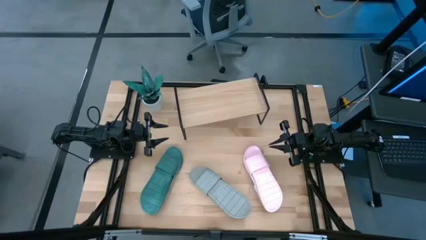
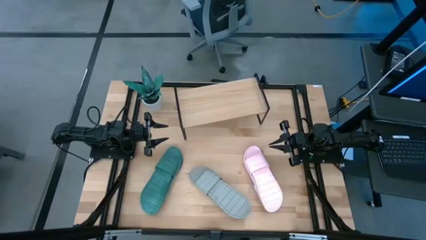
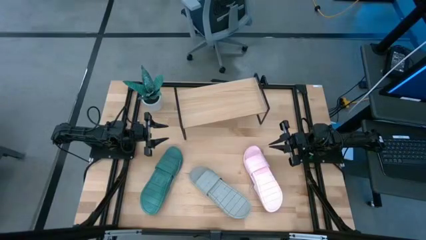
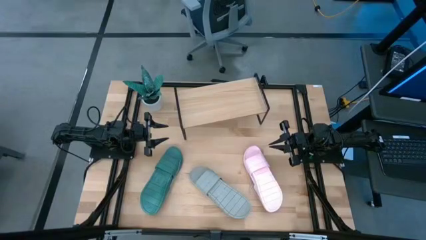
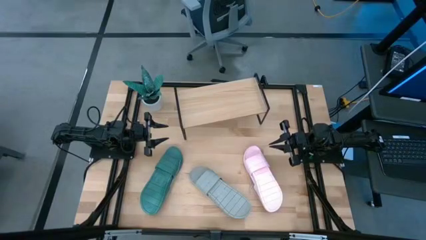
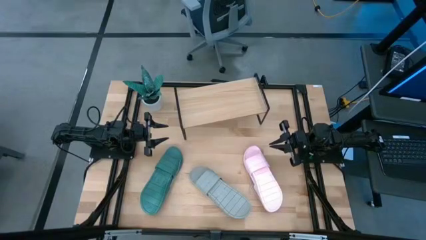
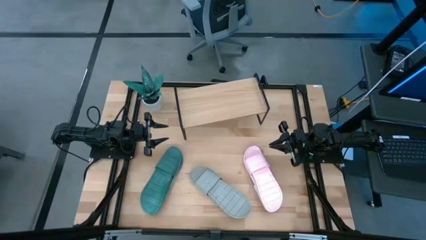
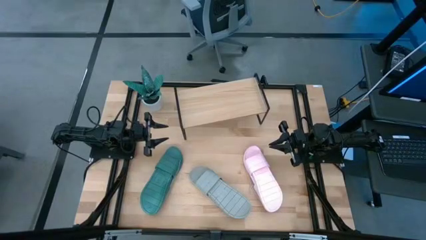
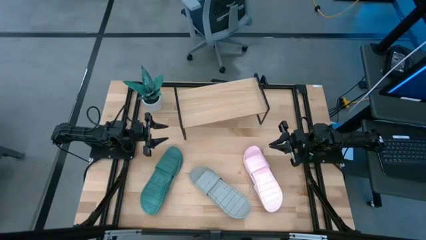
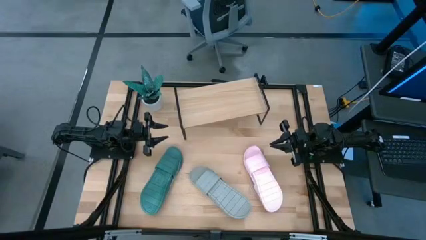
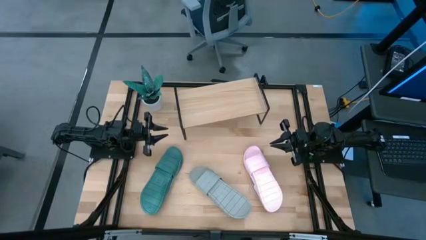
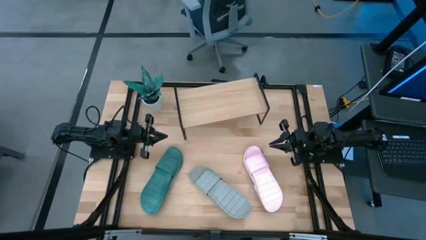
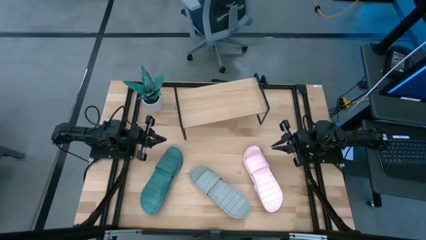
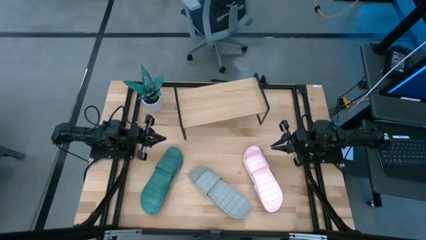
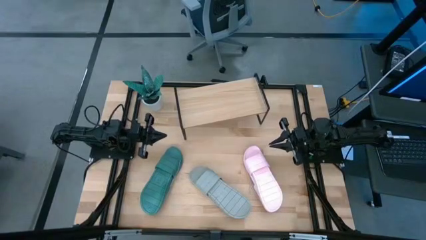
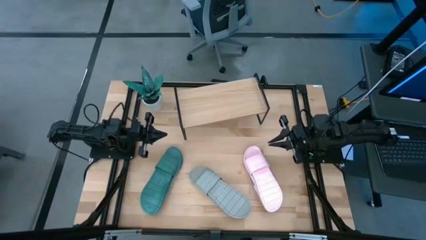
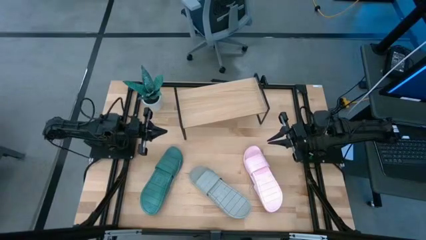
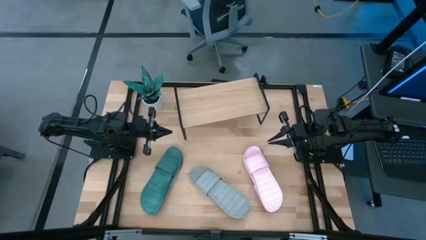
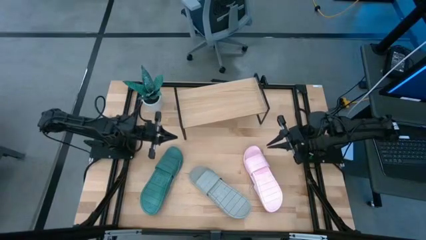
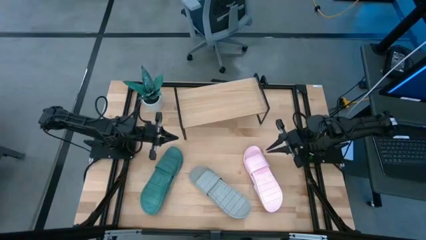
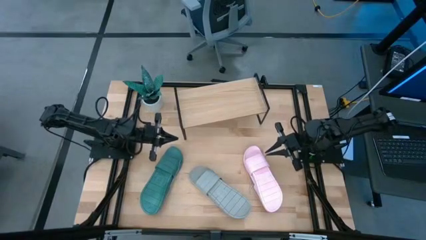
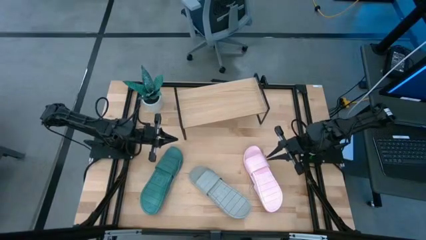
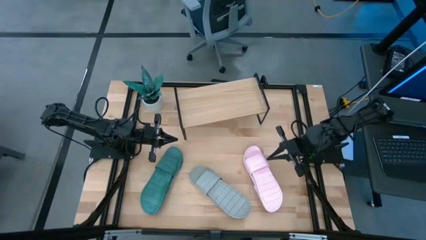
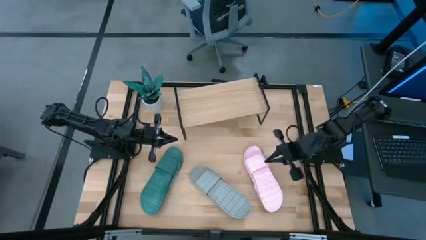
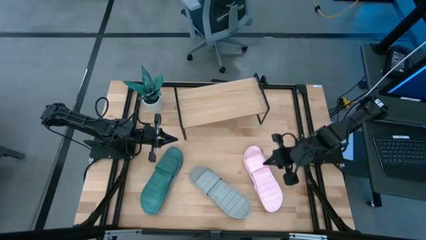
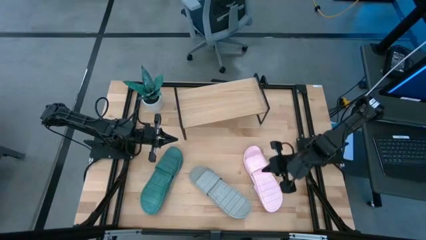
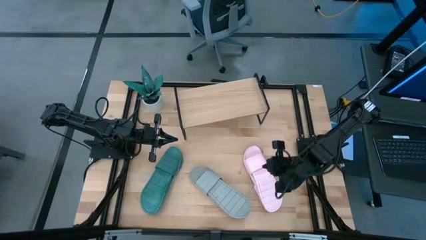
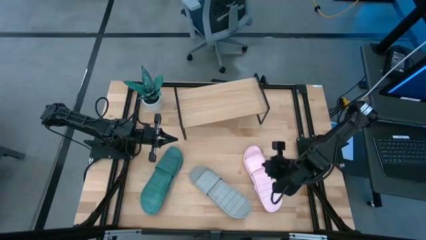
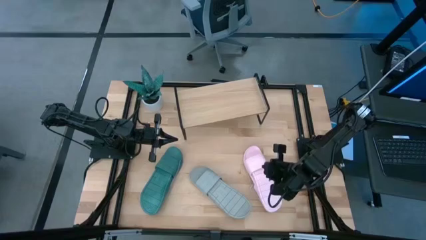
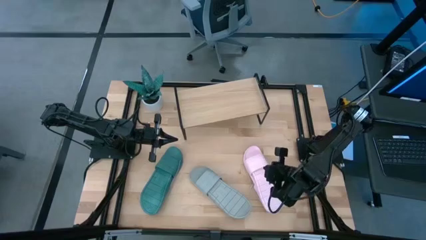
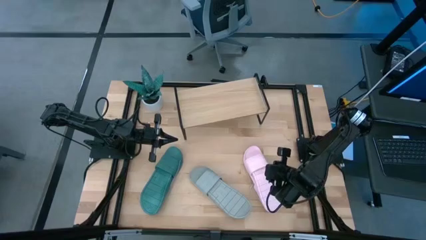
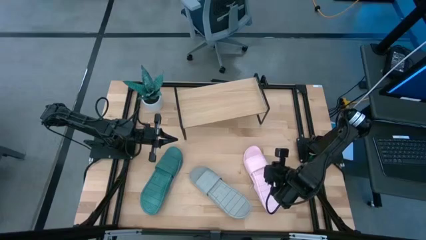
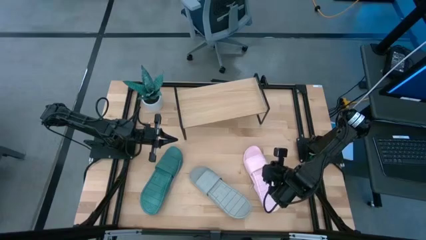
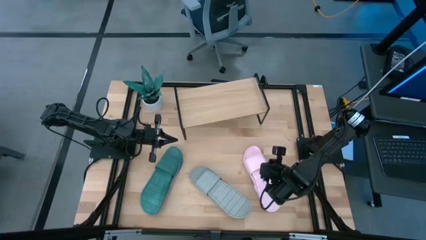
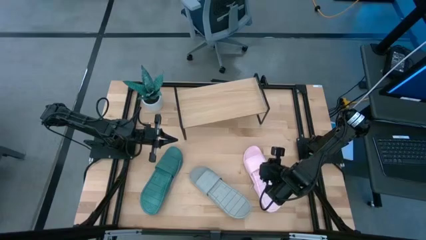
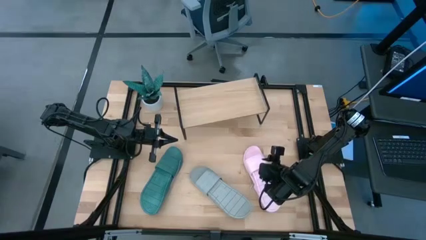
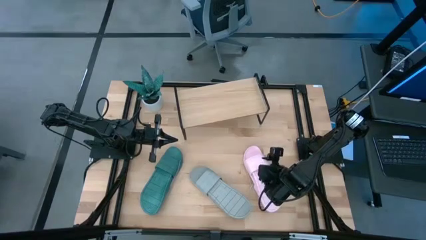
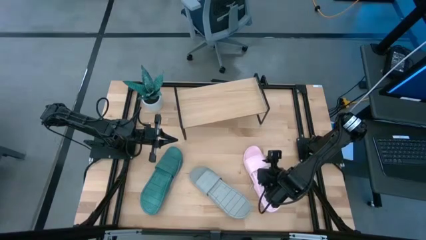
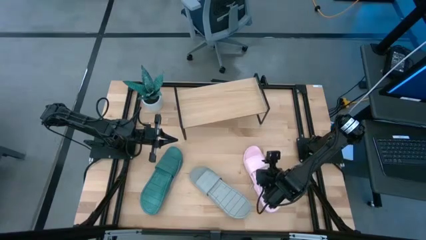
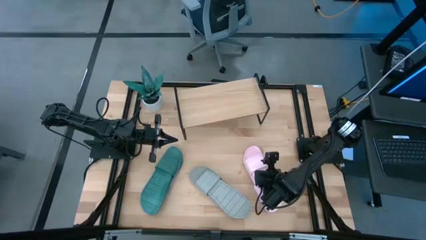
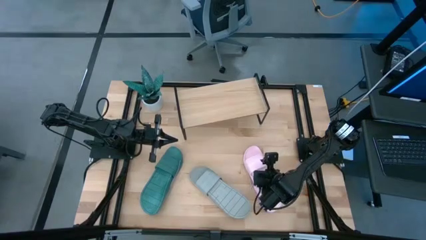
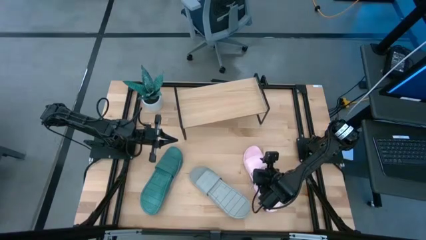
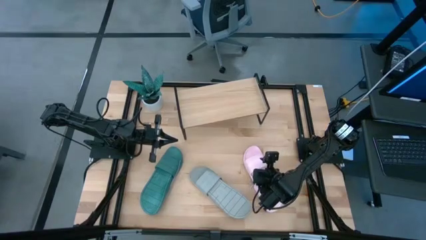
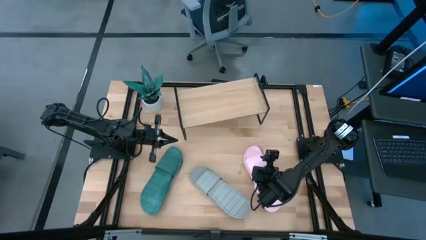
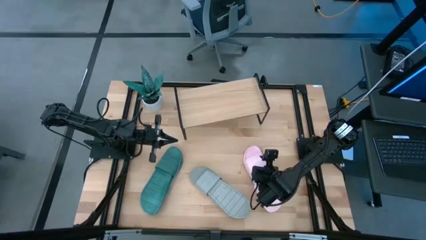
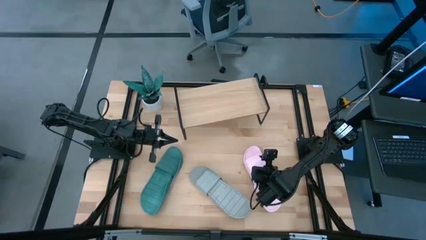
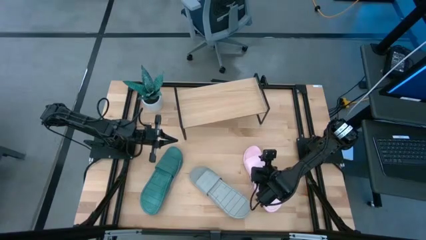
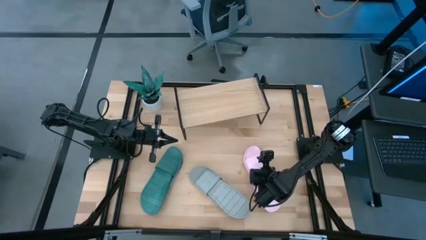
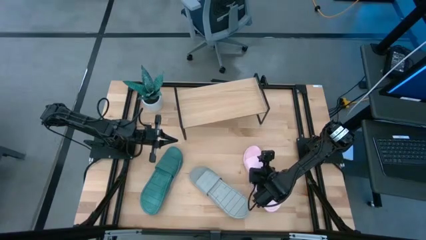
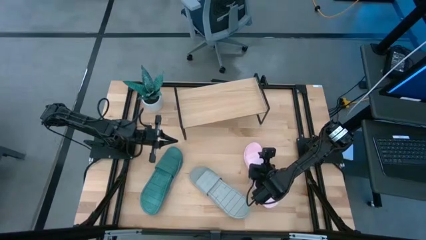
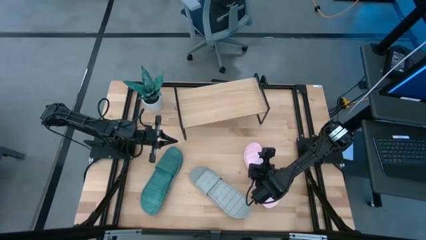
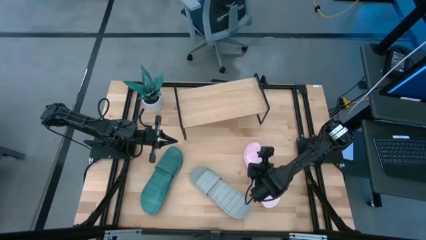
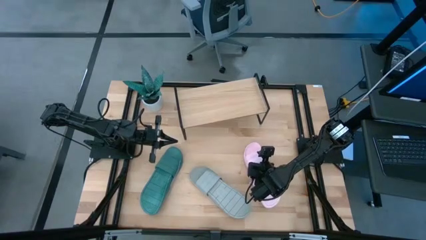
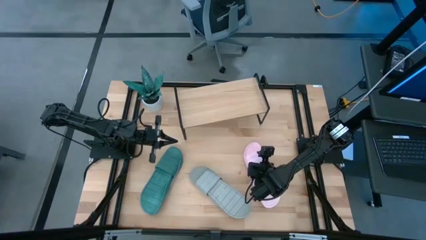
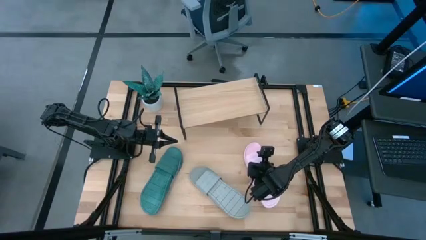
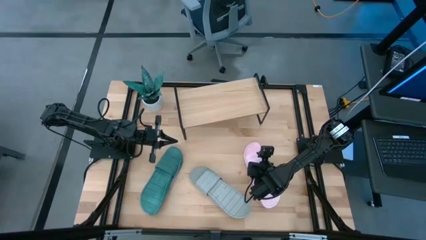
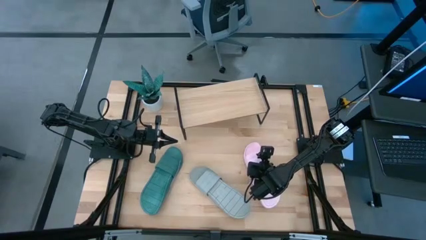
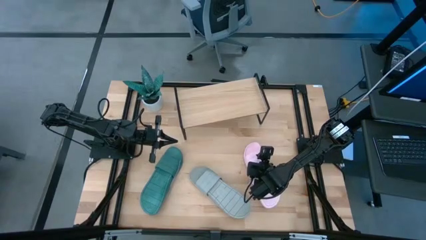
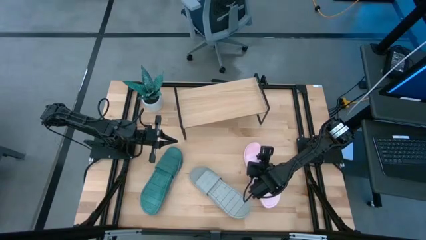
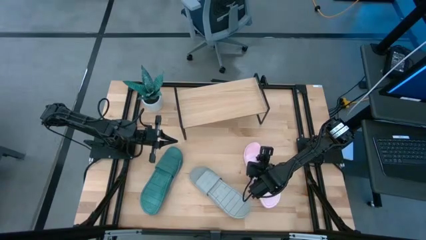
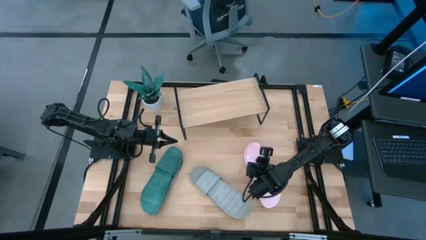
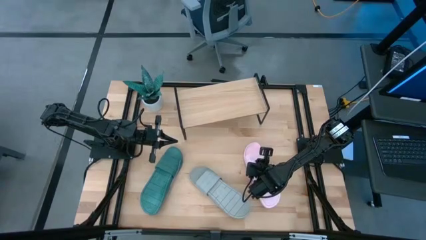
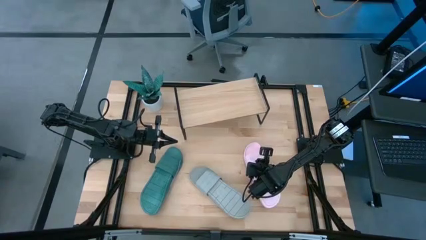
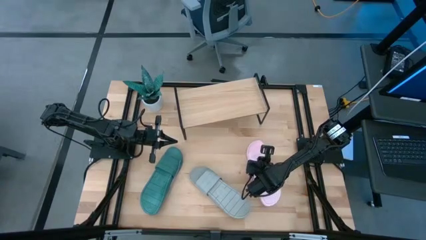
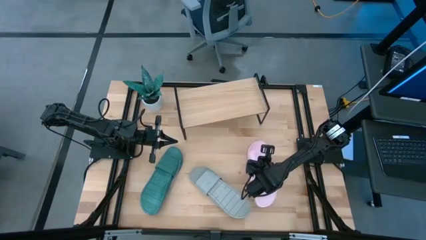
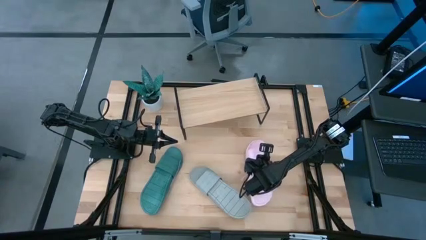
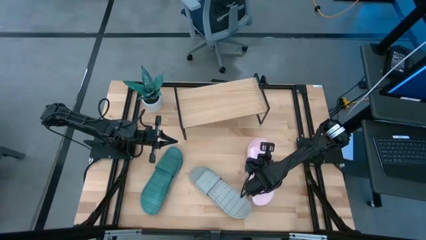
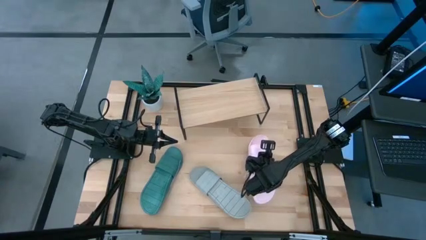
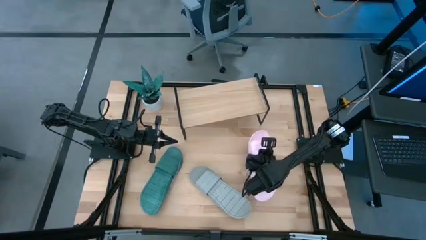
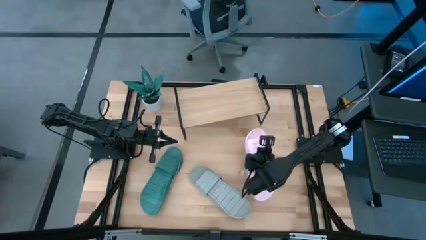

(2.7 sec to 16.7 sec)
Task: Pick and place slides into the shelf
Put the pink pair of slides on the shelf
